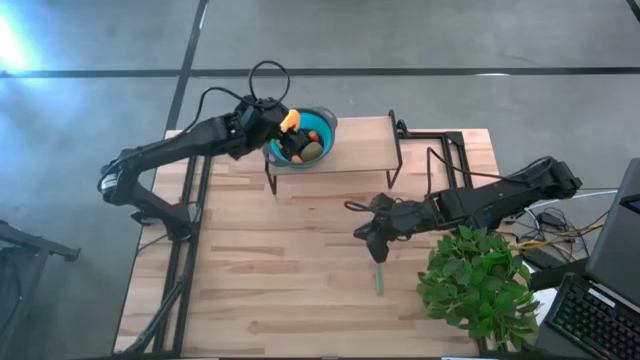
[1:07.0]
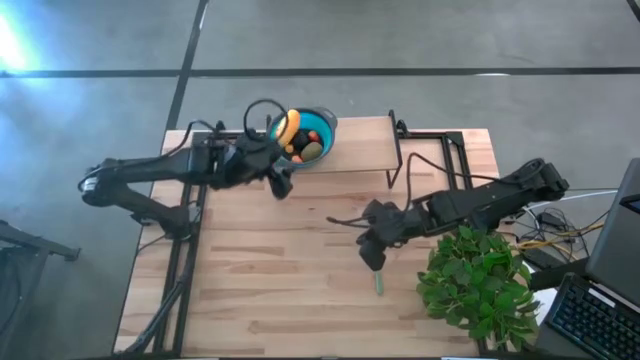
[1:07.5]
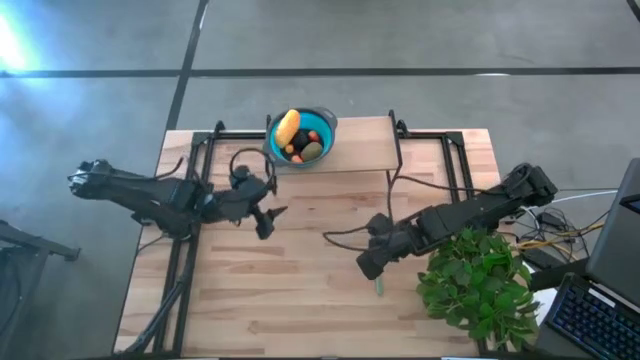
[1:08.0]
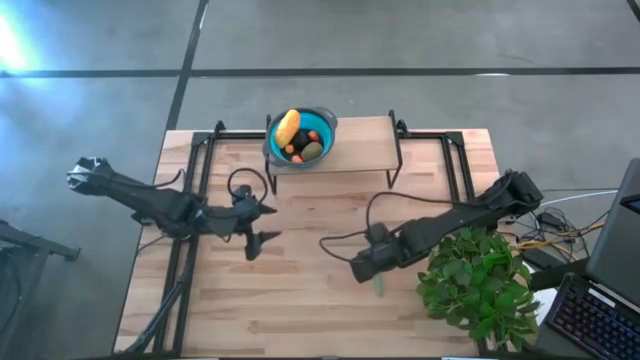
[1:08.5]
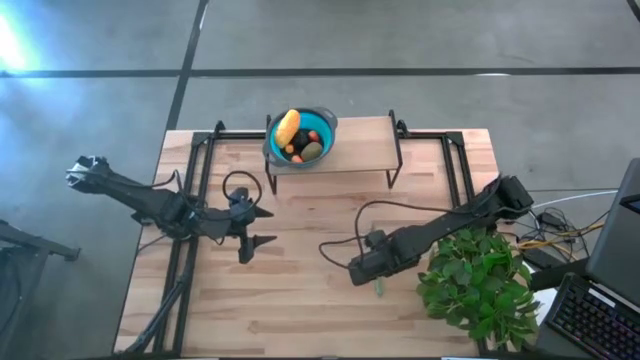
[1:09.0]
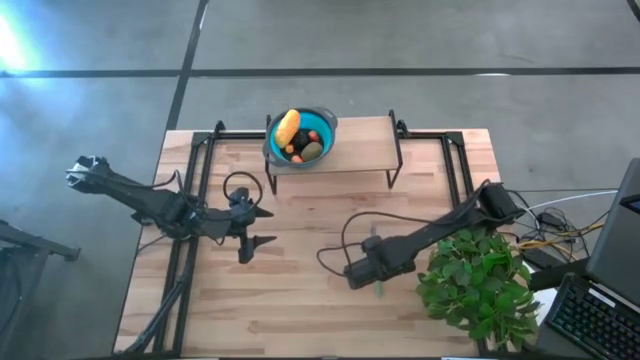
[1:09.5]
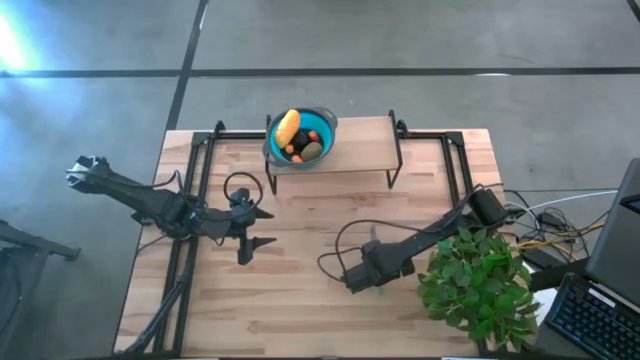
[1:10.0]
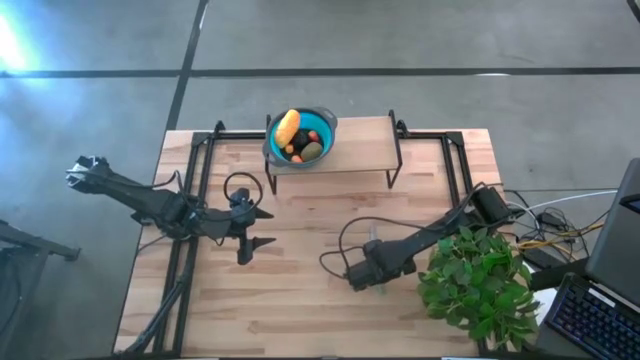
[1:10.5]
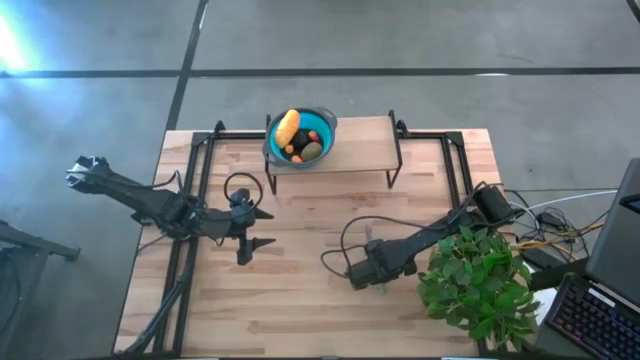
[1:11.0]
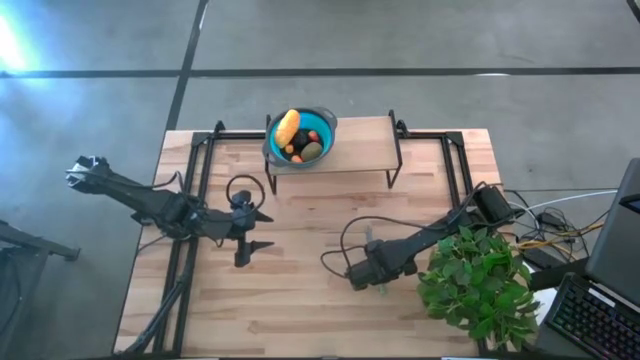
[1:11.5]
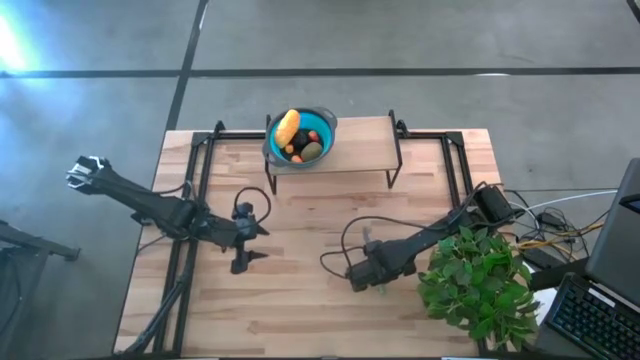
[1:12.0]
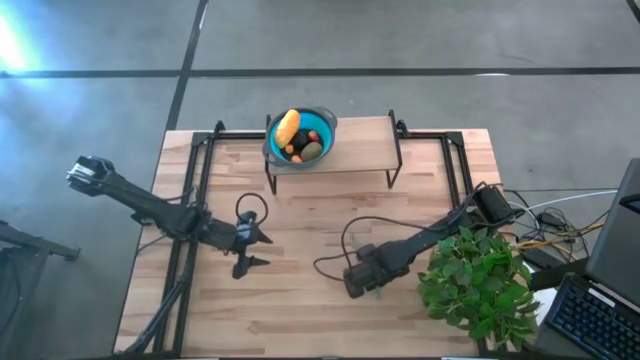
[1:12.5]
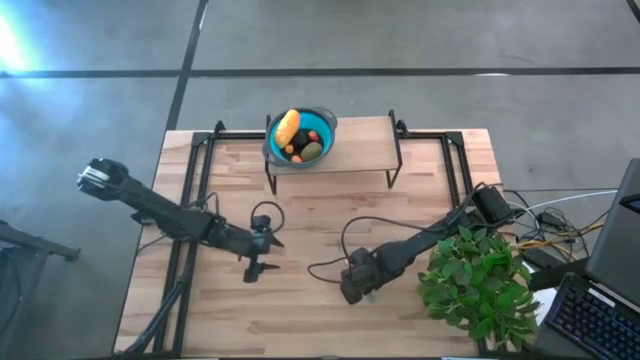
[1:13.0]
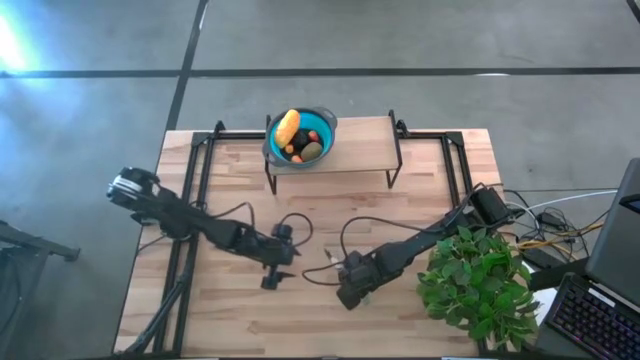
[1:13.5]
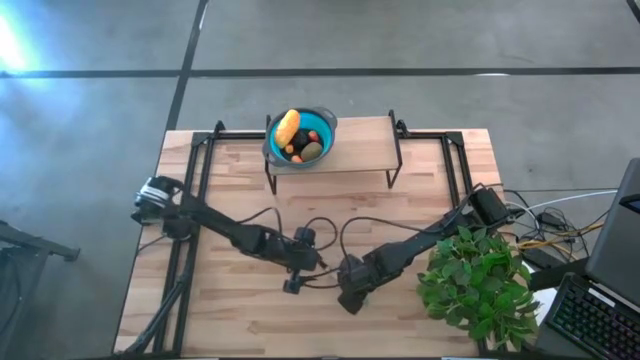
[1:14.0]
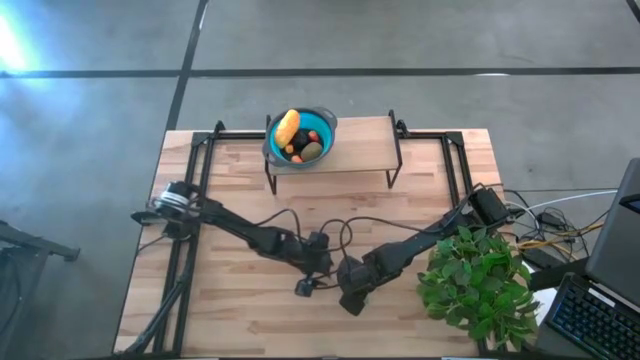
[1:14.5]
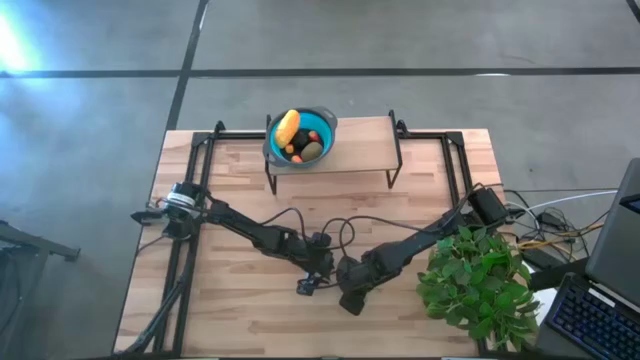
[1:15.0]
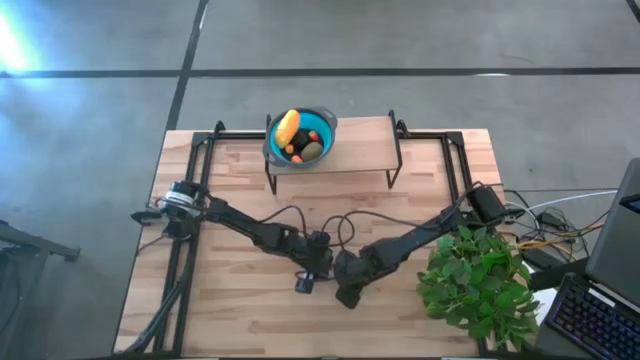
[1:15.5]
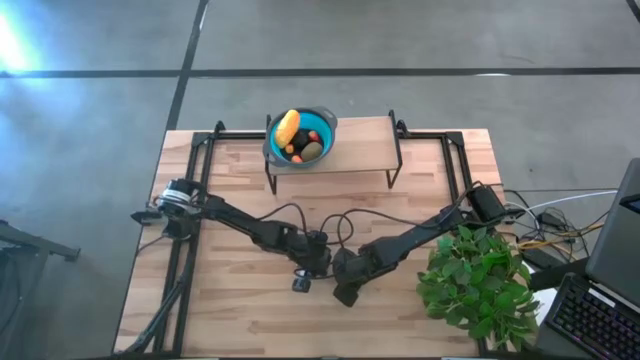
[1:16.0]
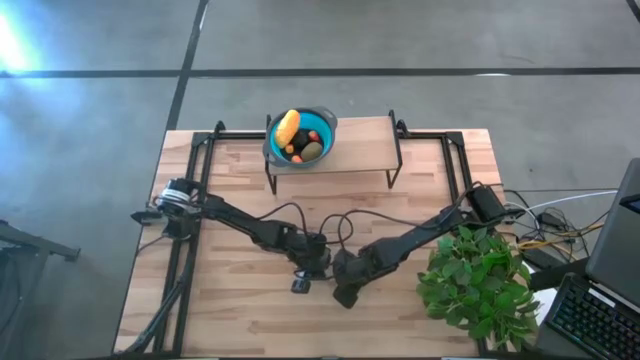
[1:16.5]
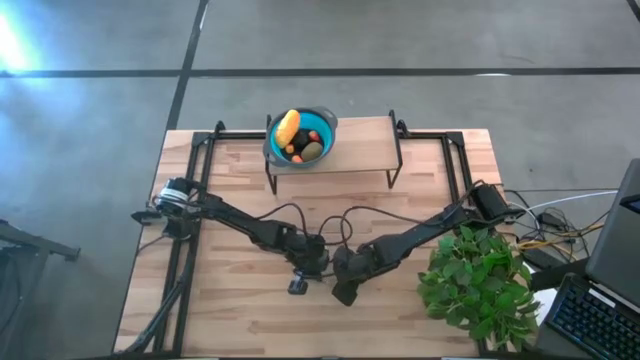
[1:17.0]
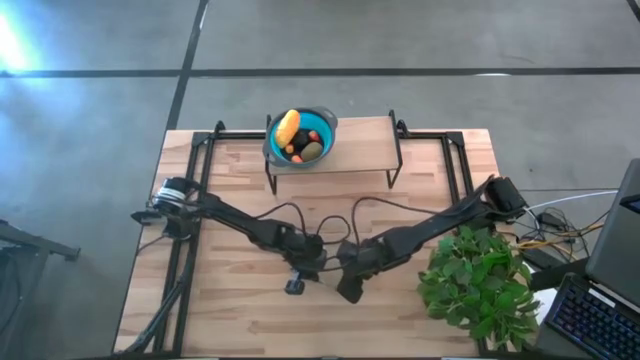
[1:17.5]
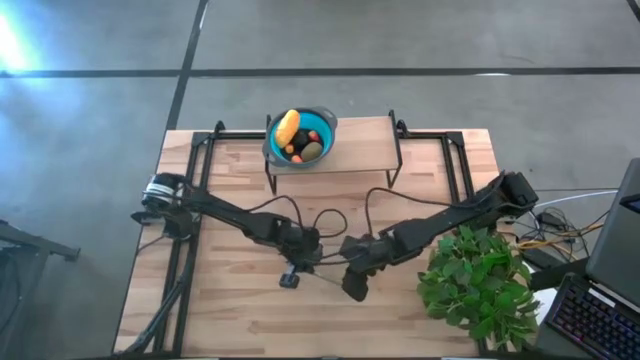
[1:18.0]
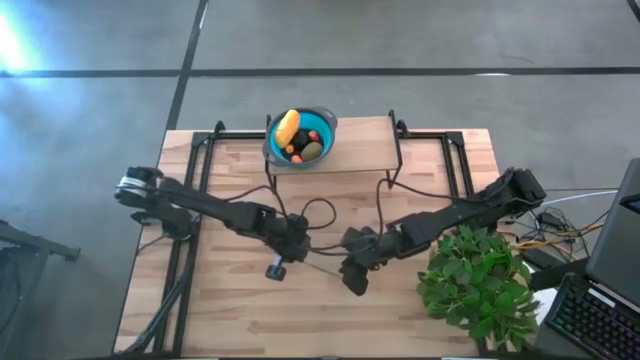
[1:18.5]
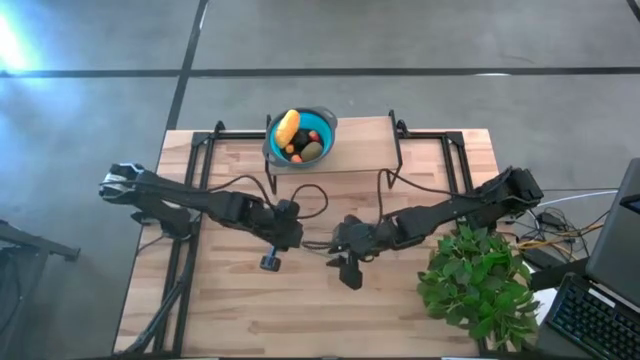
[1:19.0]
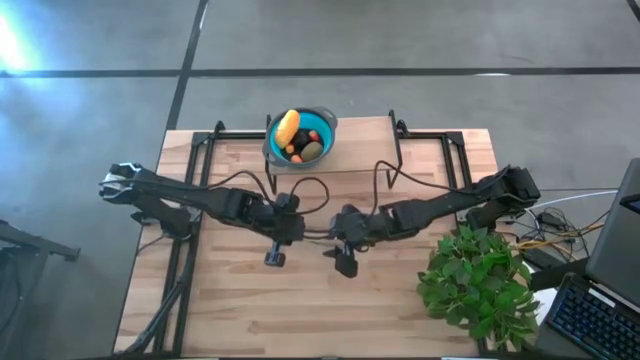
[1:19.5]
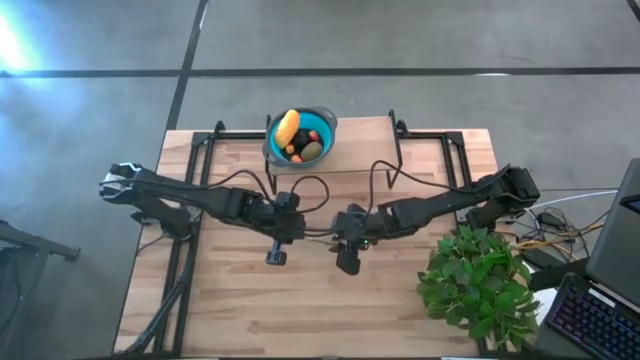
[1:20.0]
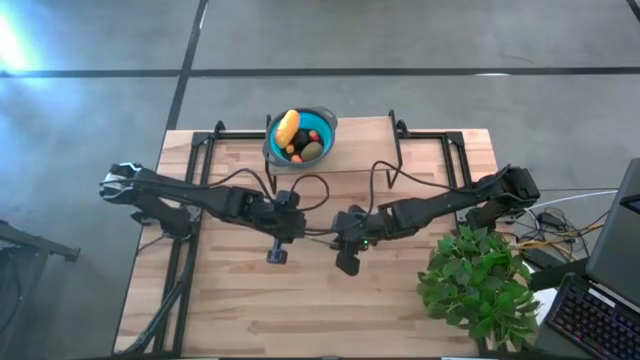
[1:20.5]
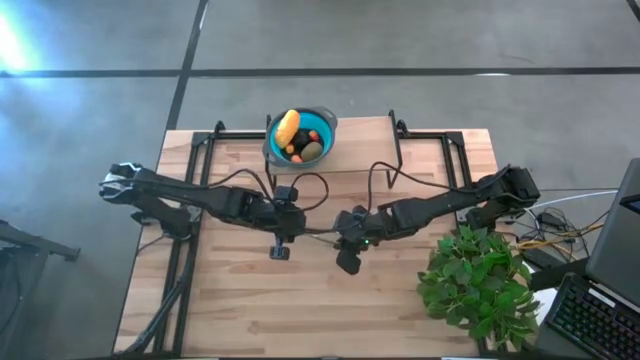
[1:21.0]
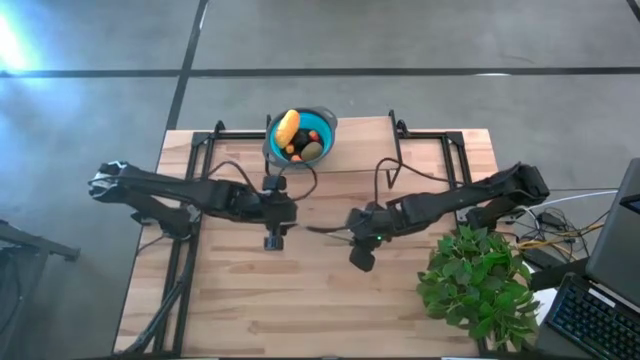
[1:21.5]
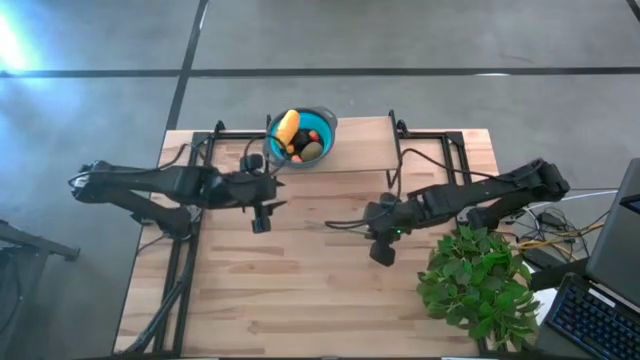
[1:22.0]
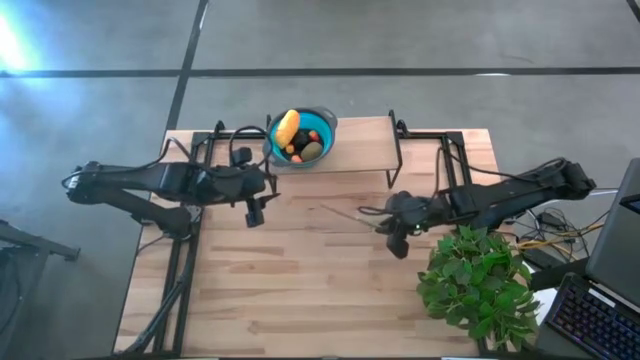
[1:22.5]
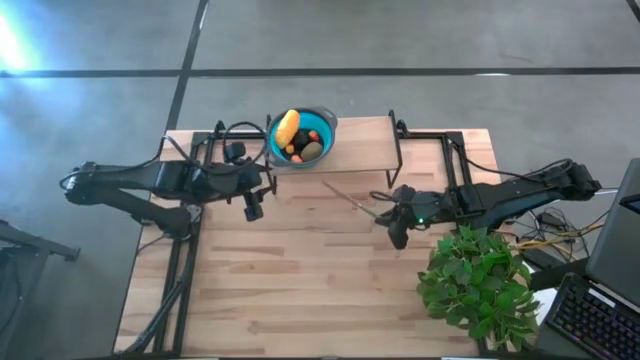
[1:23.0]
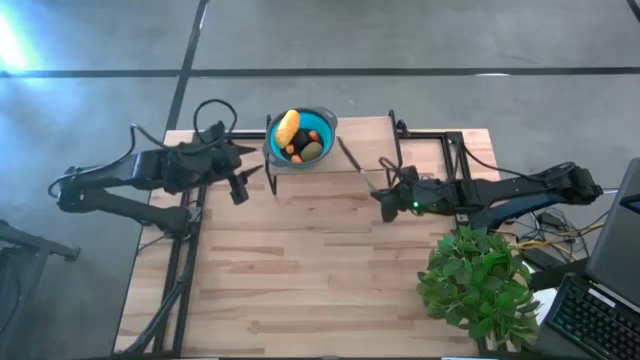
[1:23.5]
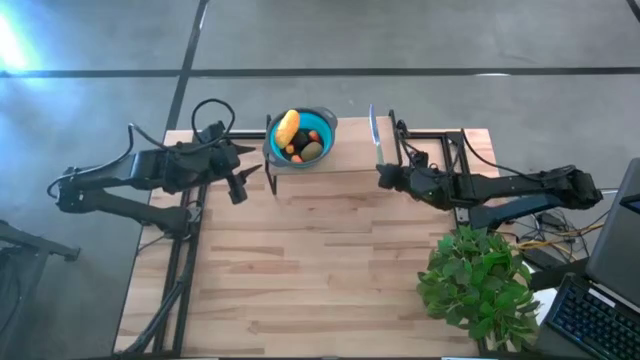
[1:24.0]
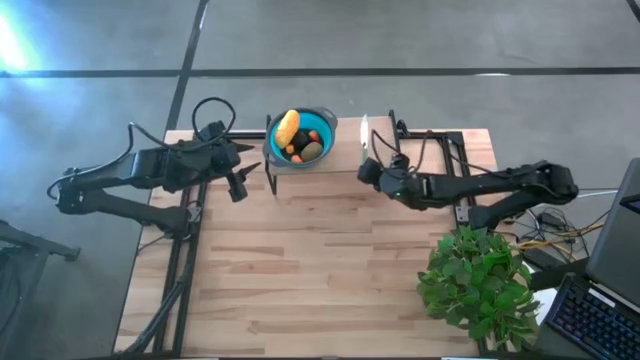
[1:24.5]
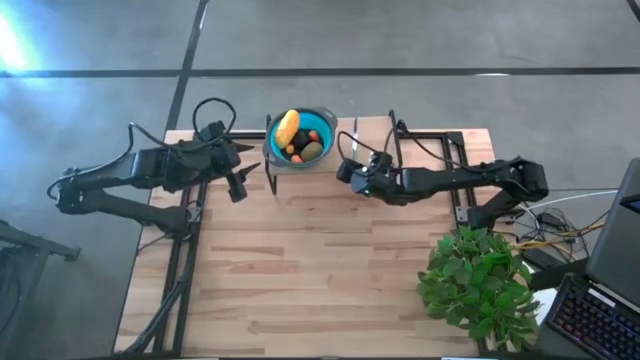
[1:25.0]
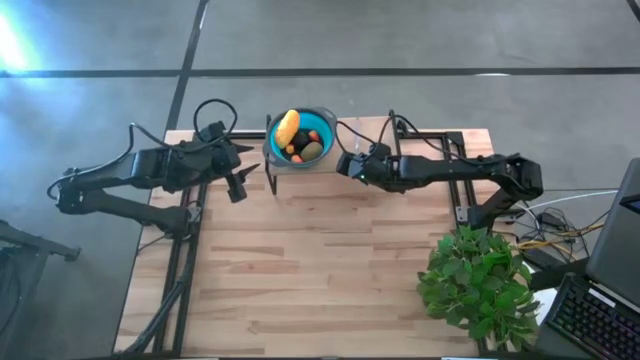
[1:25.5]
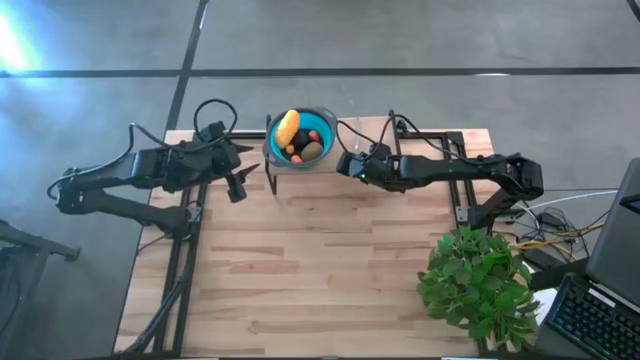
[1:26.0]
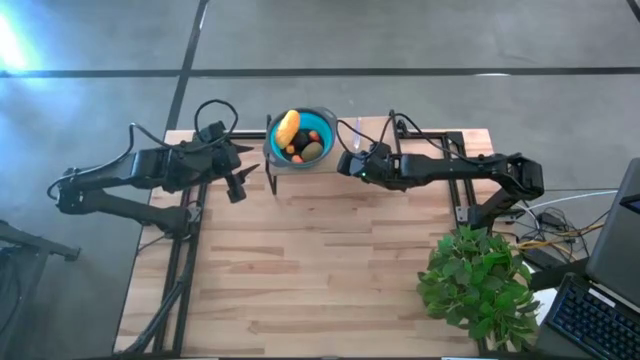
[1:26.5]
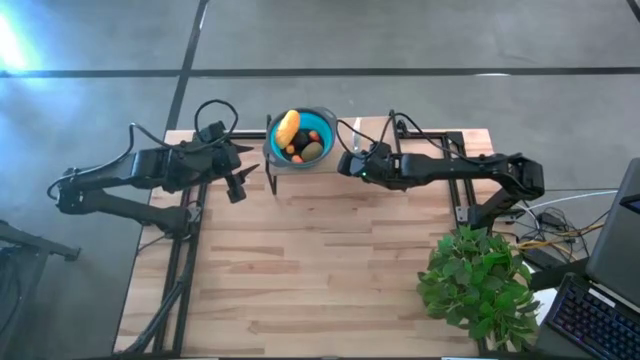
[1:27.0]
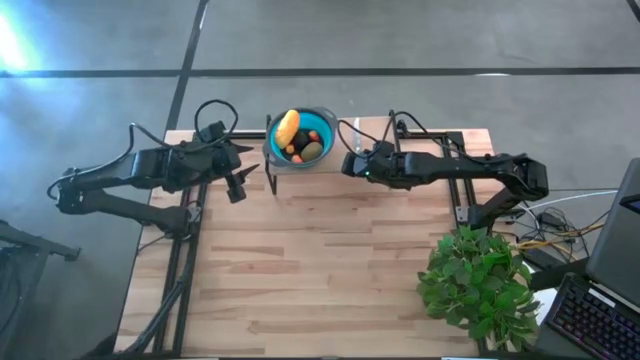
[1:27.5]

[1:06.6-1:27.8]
Task: Pick & Place Fruit
Put the green table knife on the shelf

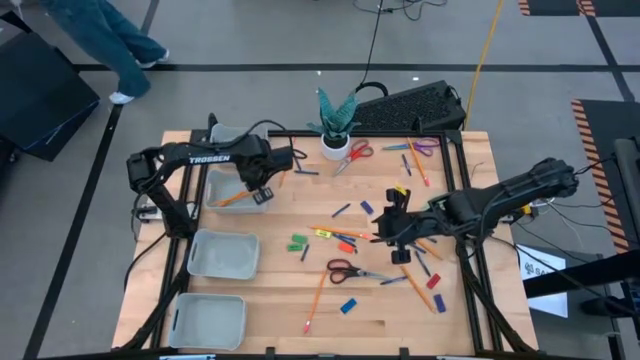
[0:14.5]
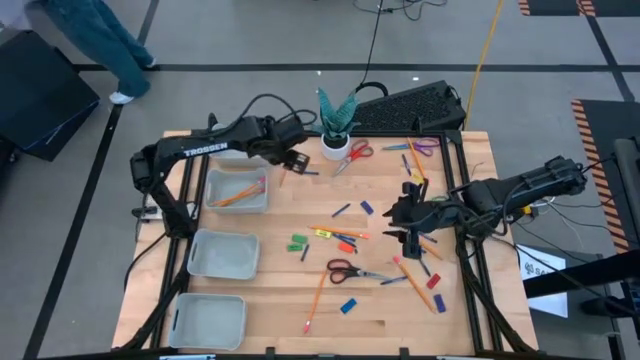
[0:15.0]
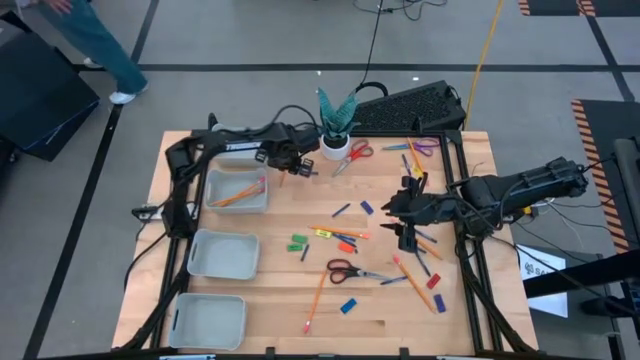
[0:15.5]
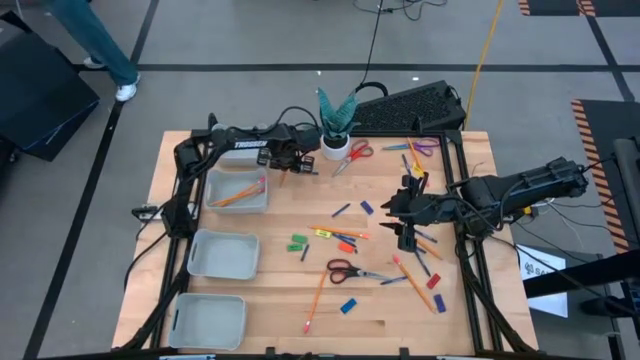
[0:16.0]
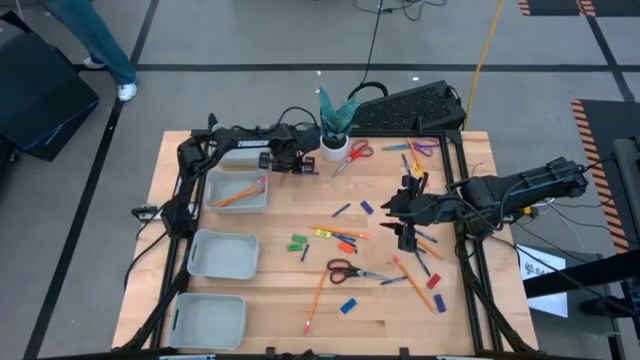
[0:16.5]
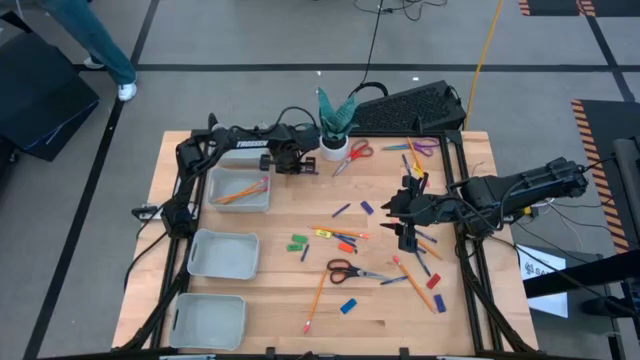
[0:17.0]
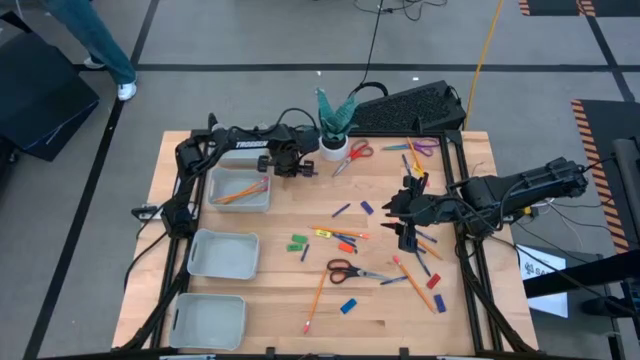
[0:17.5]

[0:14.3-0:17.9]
Task: Sort crayons/erasers/pens/pencils in bins
Put the orange pencil into the middle top gray bin
